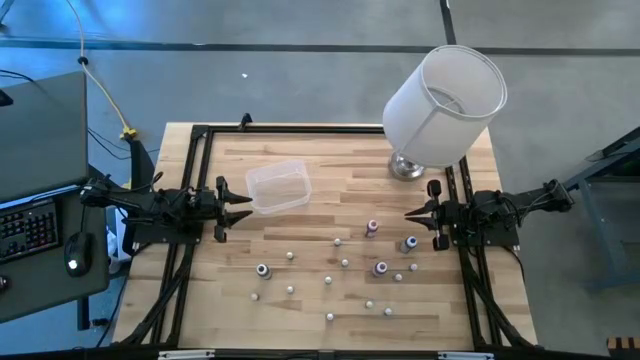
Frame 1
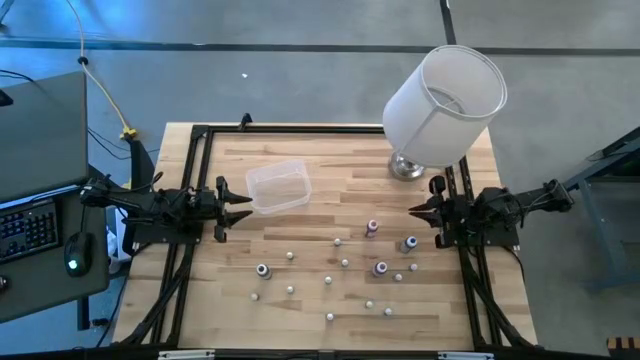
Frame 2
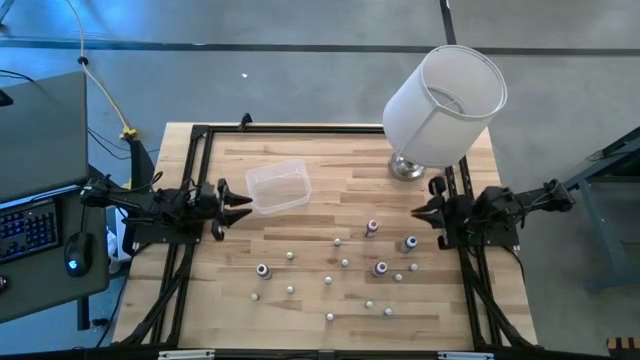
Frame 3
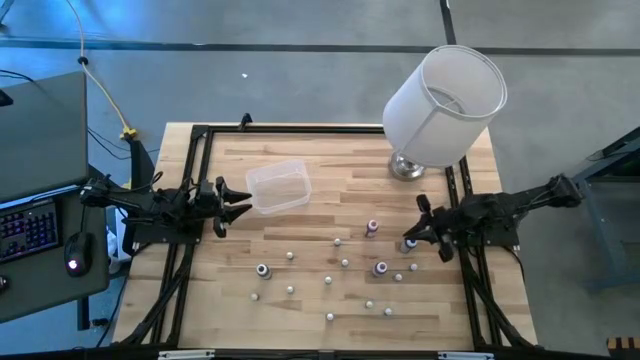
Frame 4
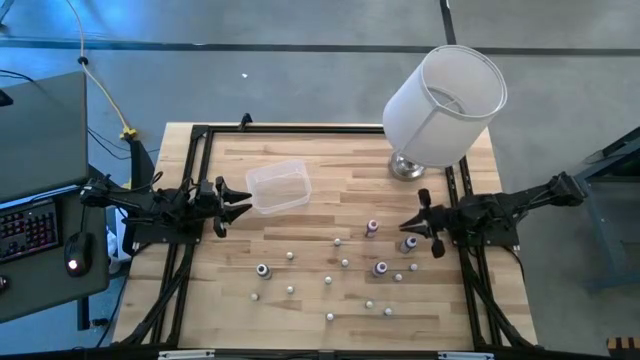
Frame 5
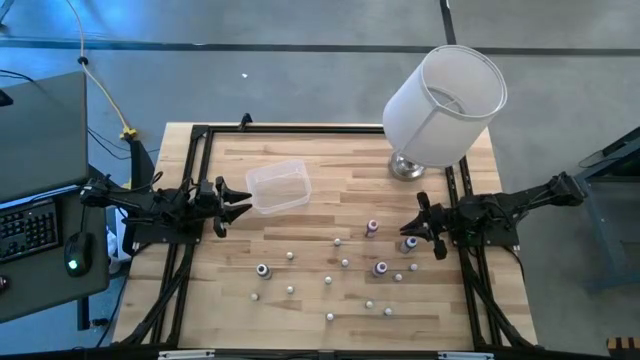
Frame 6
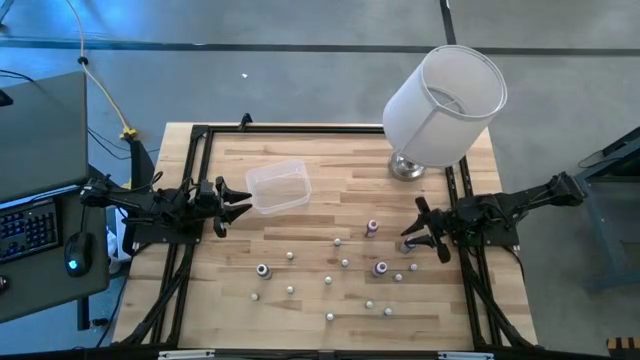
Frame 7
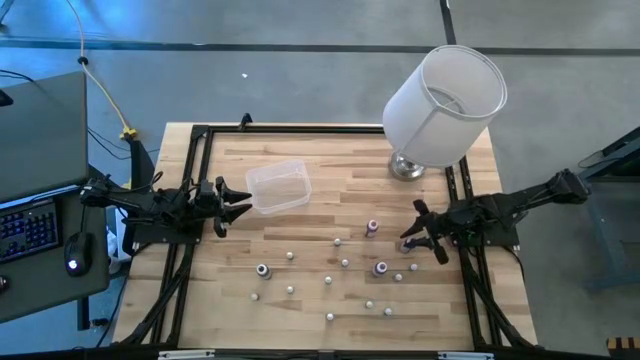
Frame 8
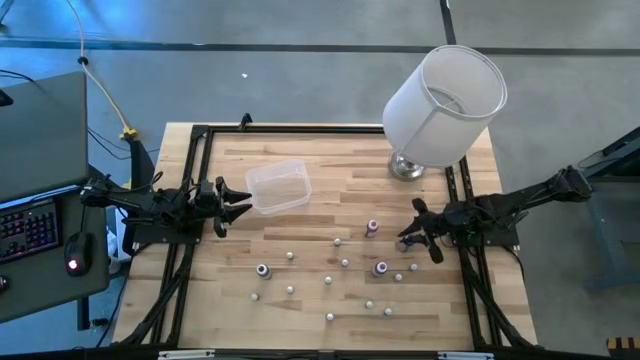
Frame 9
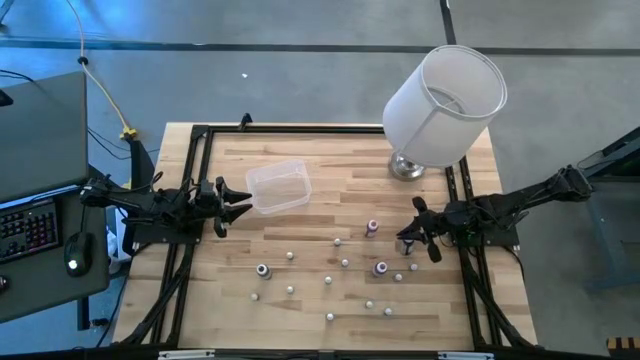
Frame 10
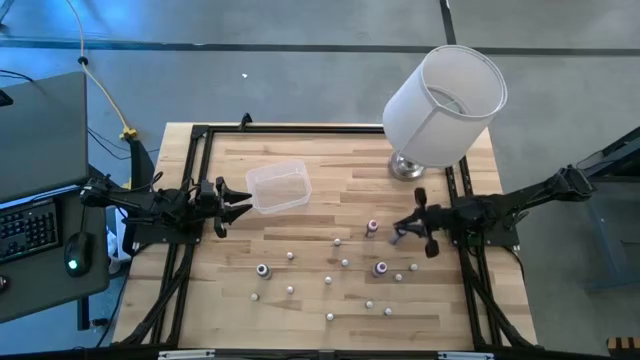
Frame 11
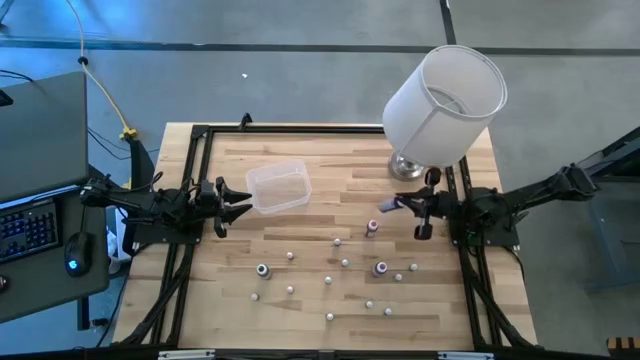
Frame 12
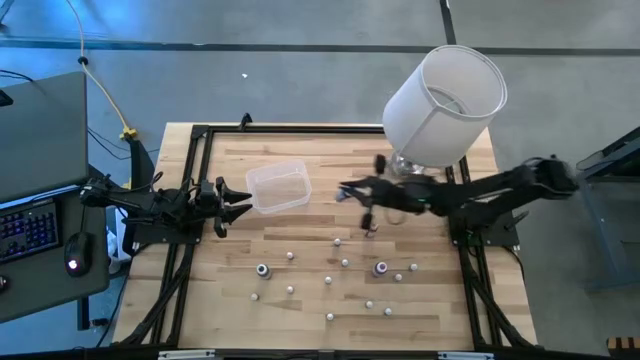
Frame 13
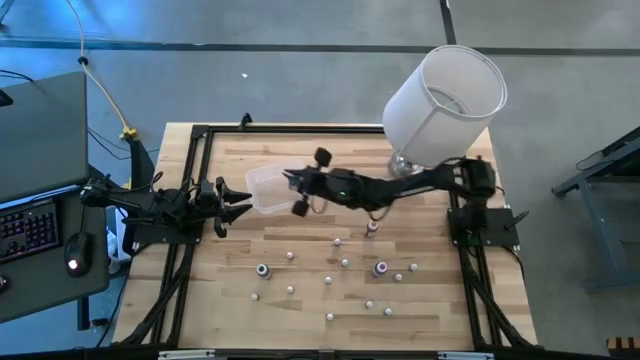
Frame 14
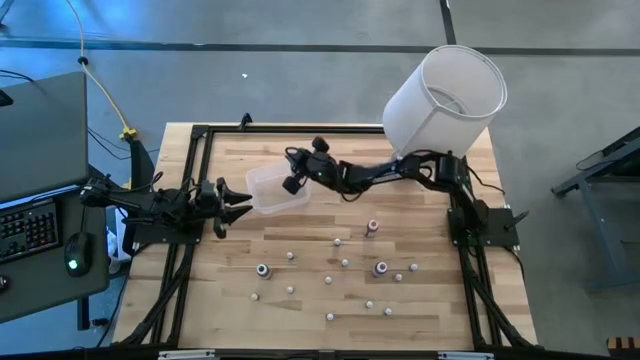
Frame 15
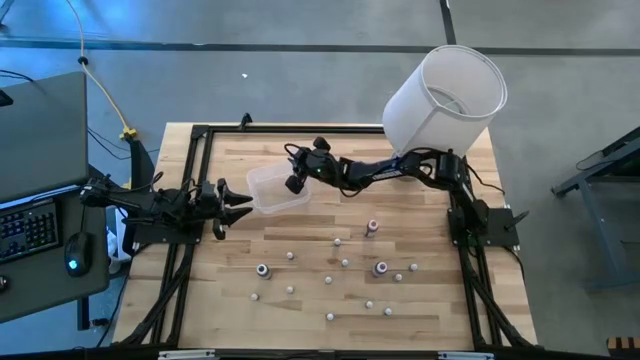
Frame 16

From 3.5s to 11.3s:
Task: Pick & Place food coloring
Put the big blue food coloring bottle into the transparent bin

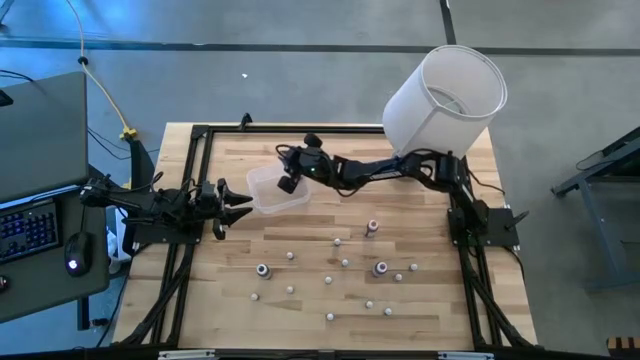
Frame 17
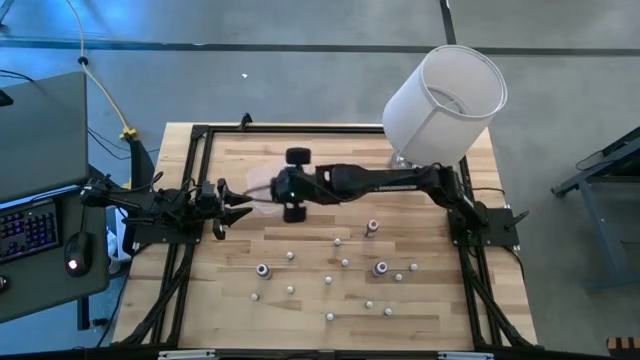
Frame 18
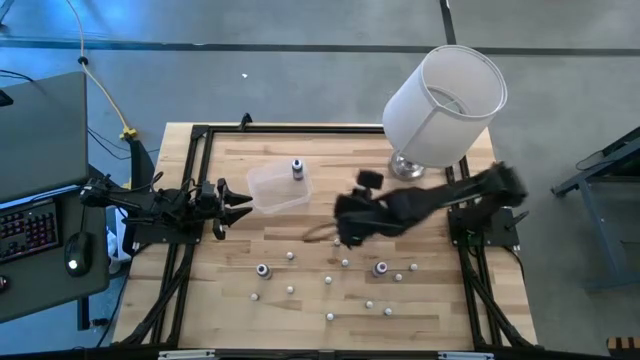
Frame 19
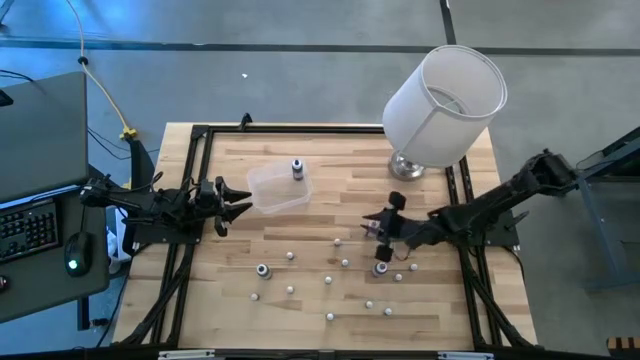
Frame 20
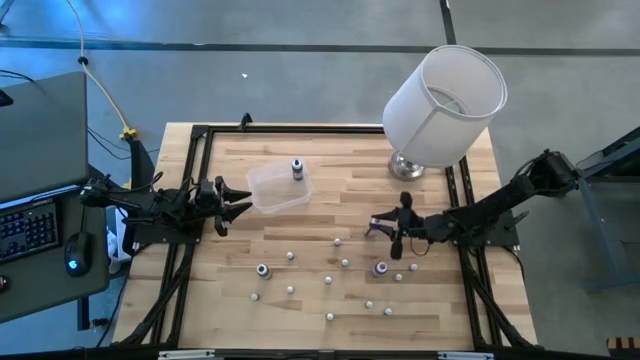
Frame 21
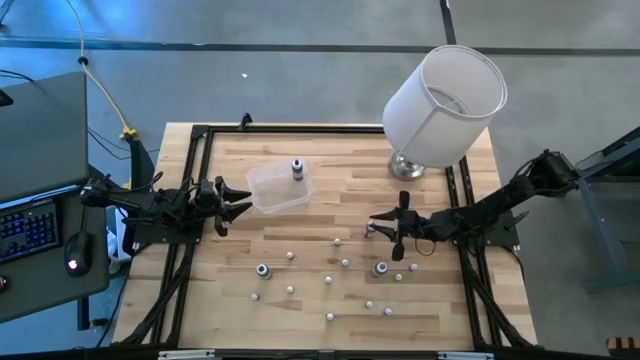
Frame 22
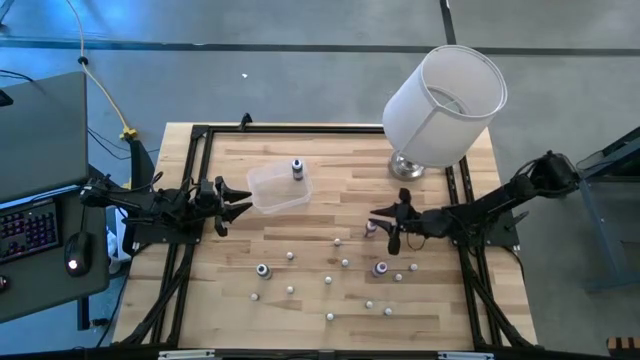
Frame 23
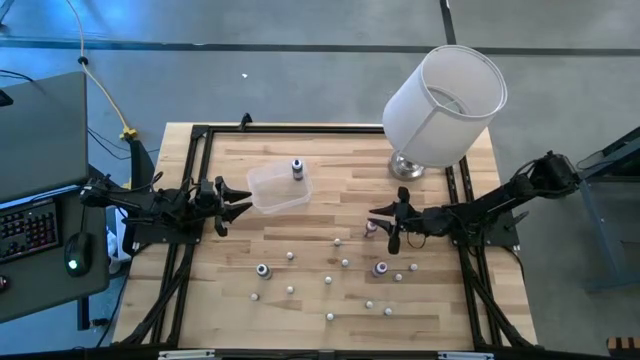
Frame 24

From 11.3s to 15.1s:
Put the big red food coloring bottle into the transparent bin

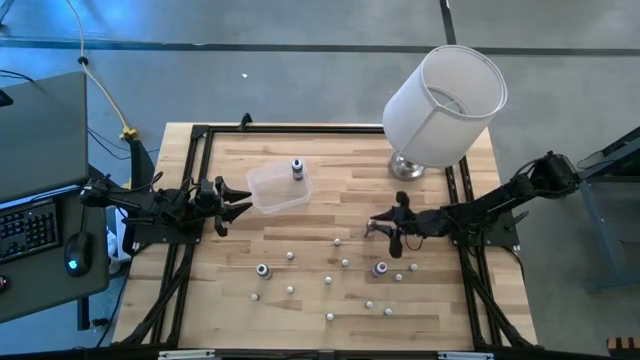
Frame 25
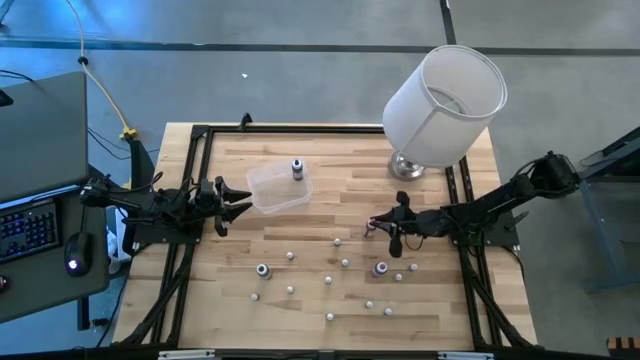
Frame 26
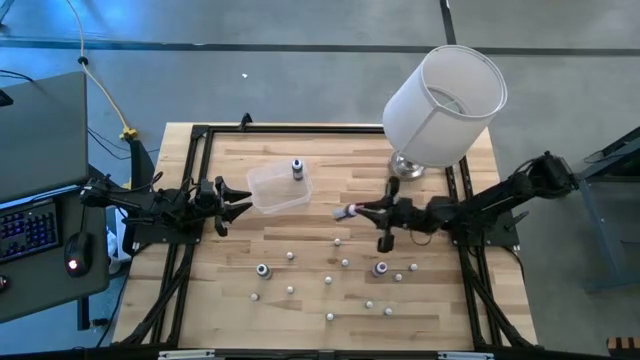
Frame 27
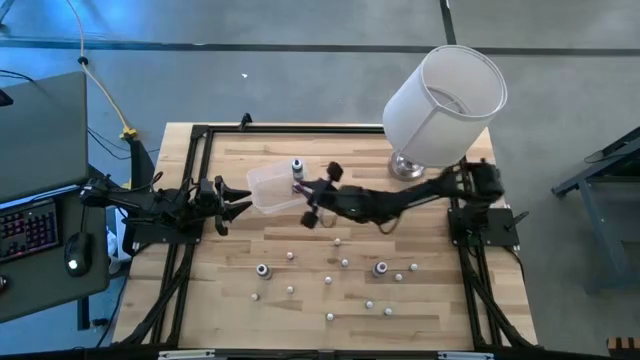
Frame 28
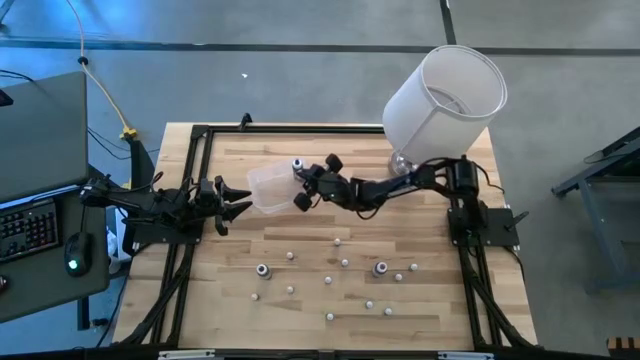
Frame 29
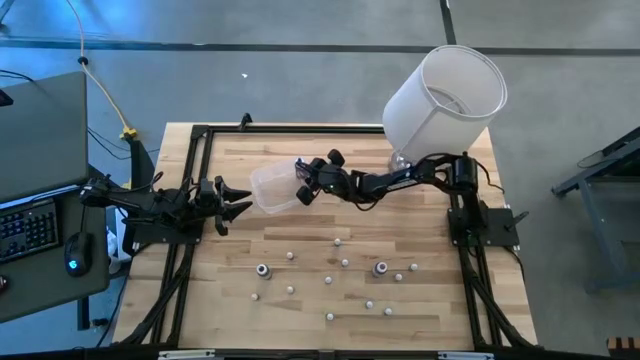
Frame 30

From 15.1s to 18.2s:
Put the big red food coloring bottle into the transparent bin

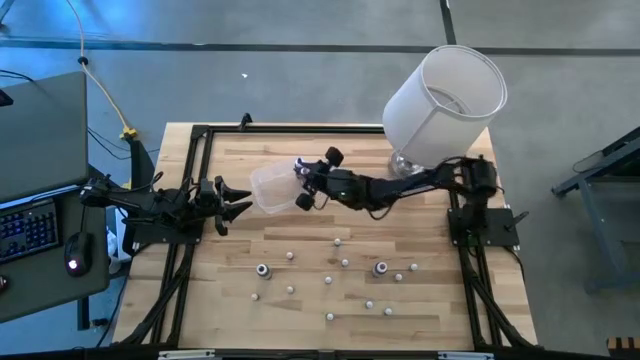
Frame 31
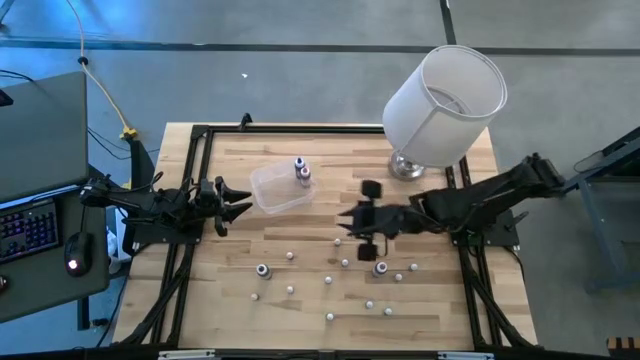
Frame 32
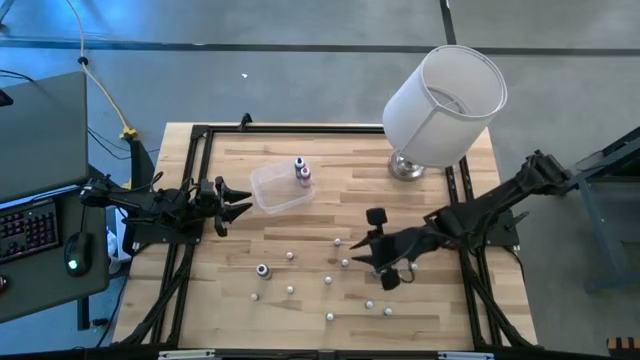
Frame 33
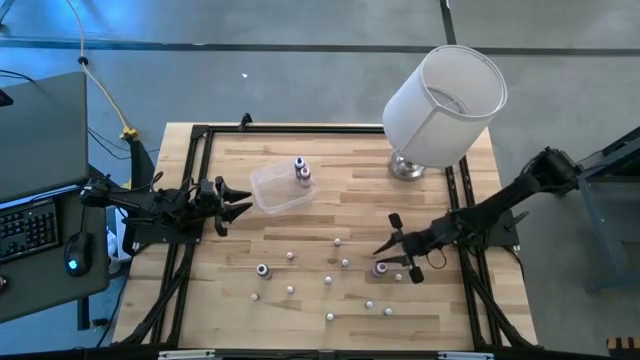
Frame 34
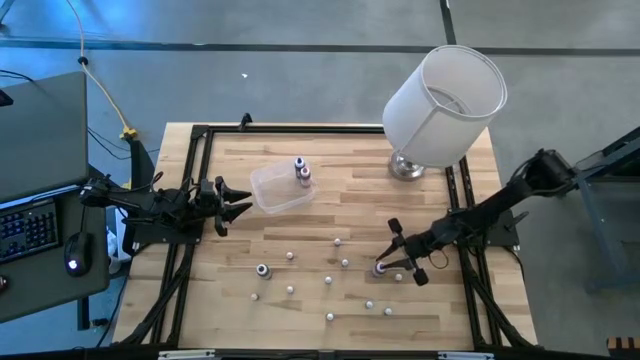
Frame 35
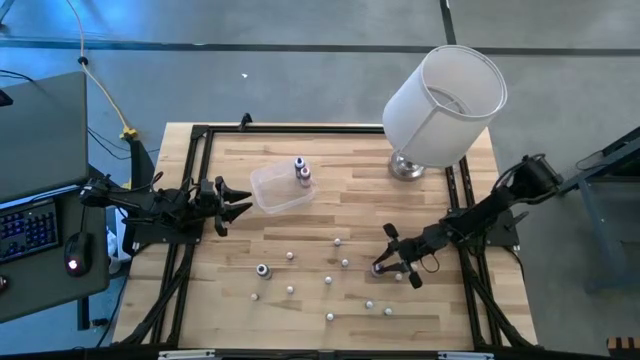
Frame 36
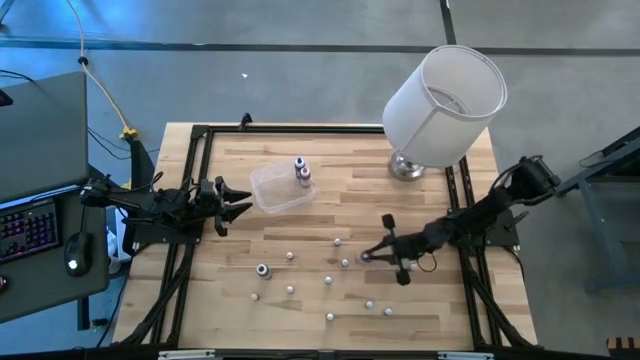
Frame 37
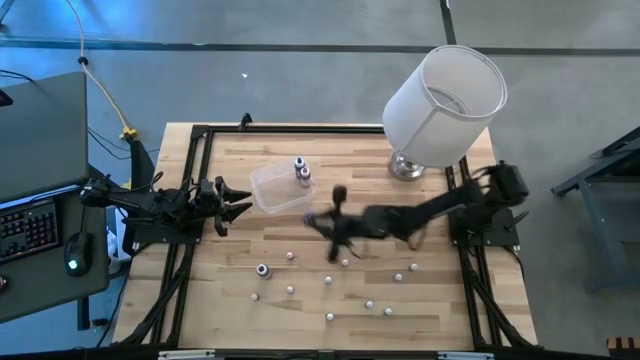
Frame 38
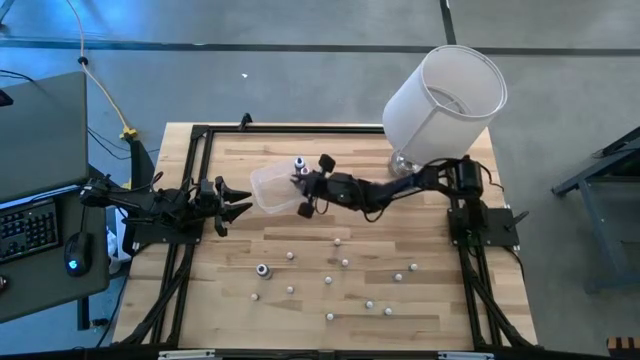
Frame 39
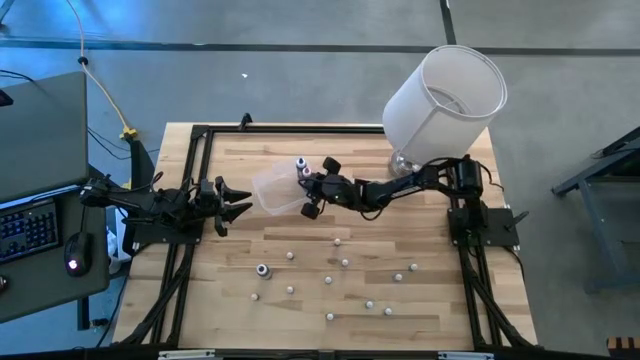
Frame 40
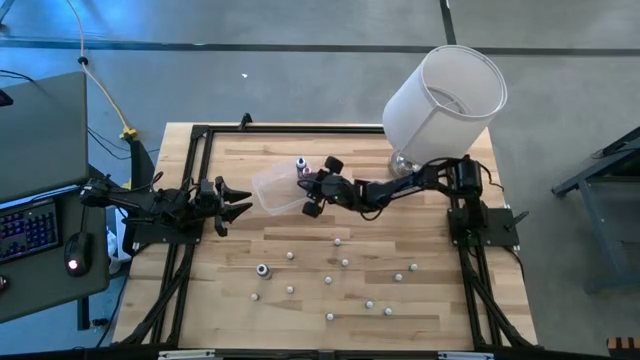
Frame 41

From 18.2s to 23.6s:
Put the big purple food coloring bottle into the transparent bin
